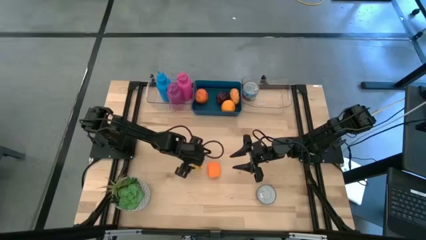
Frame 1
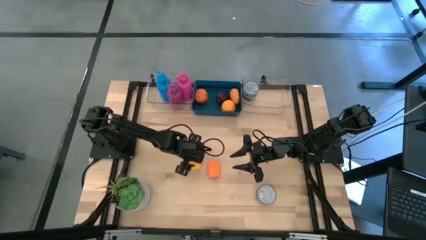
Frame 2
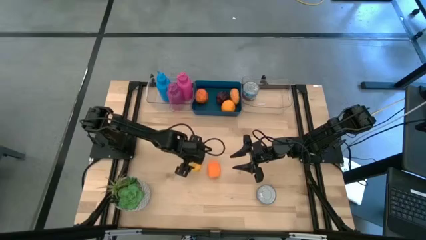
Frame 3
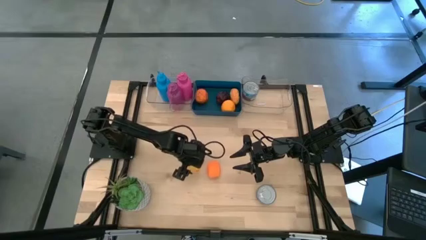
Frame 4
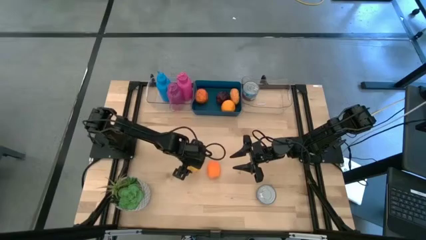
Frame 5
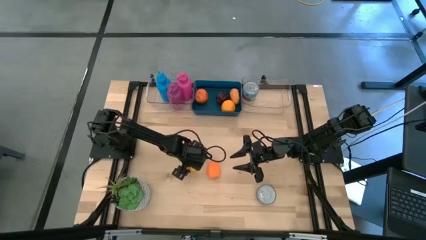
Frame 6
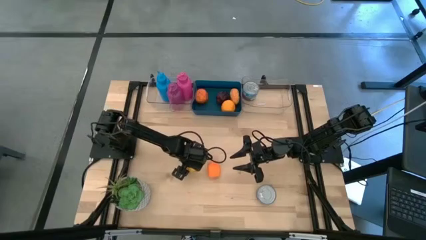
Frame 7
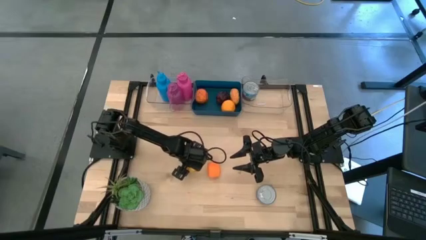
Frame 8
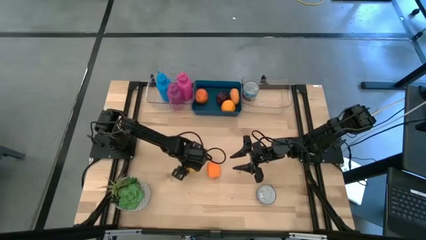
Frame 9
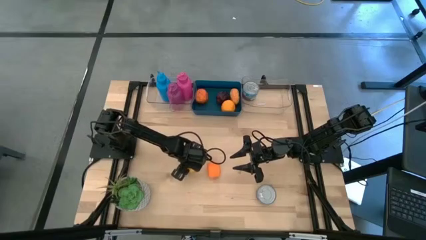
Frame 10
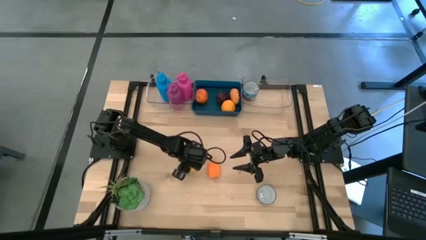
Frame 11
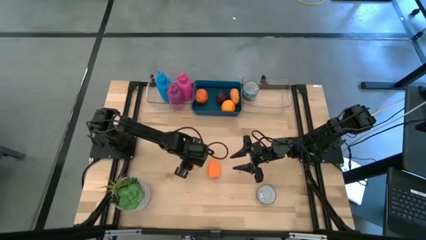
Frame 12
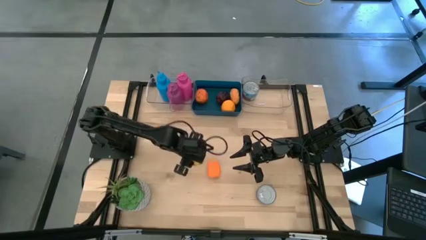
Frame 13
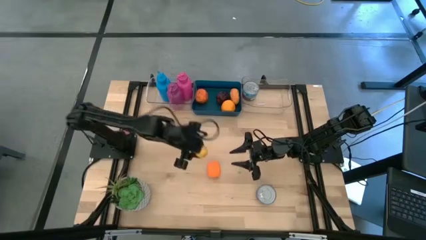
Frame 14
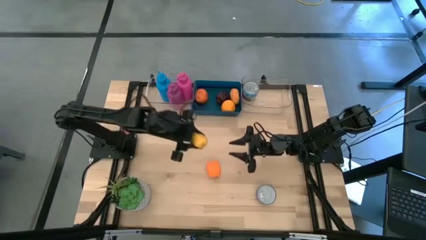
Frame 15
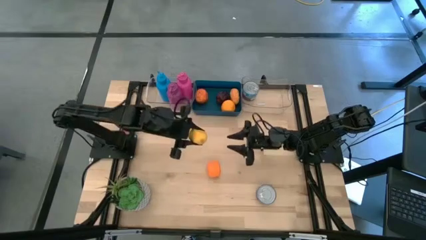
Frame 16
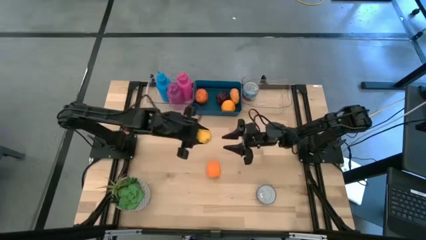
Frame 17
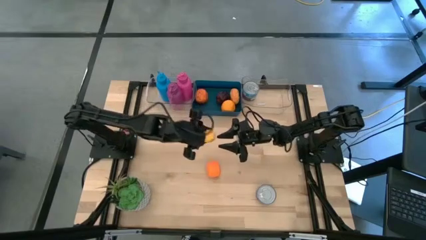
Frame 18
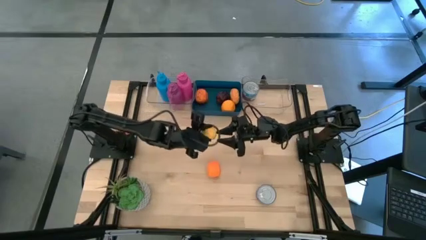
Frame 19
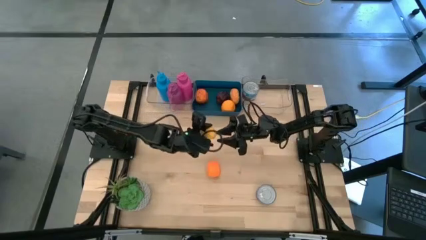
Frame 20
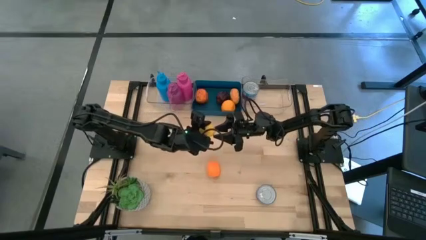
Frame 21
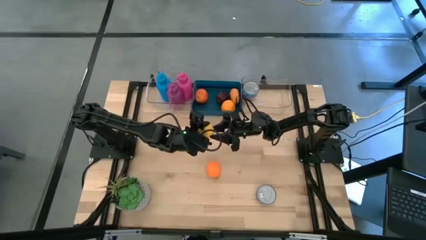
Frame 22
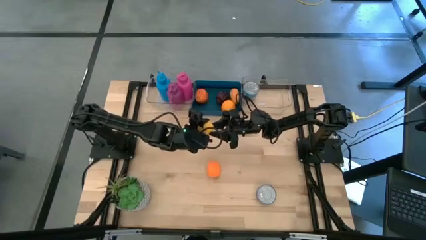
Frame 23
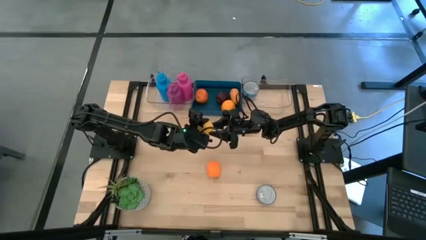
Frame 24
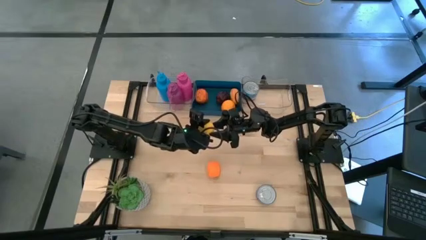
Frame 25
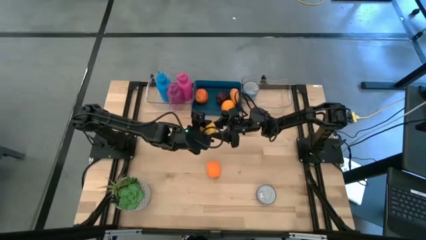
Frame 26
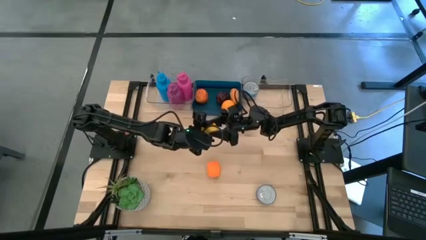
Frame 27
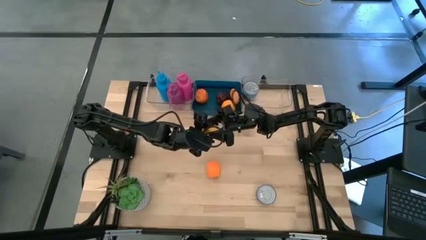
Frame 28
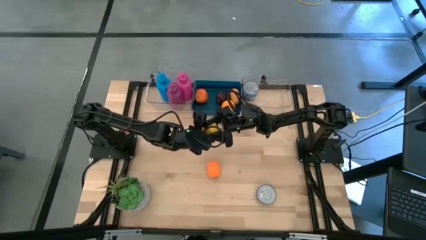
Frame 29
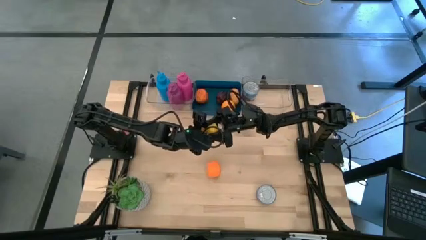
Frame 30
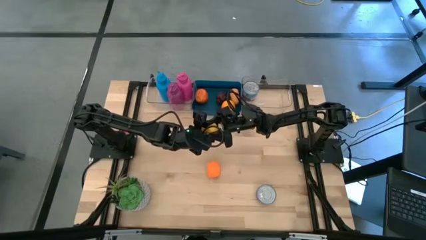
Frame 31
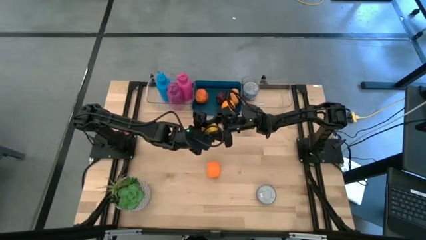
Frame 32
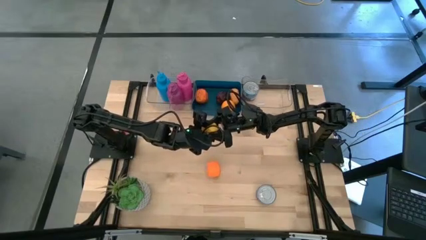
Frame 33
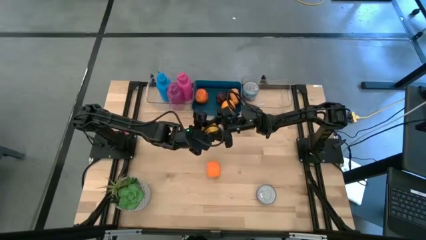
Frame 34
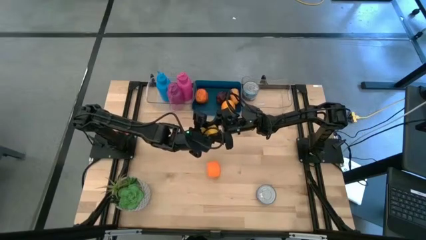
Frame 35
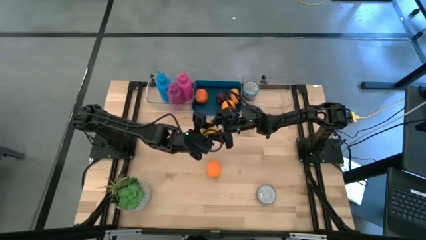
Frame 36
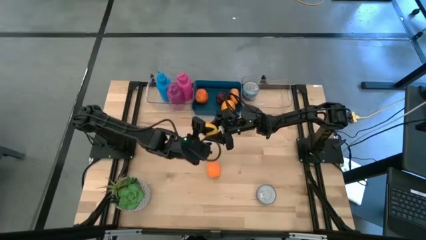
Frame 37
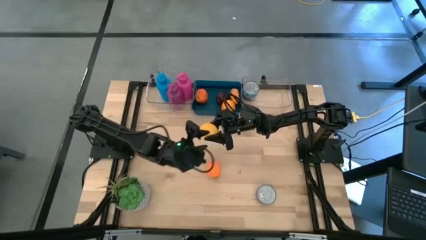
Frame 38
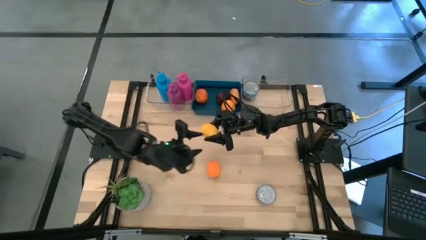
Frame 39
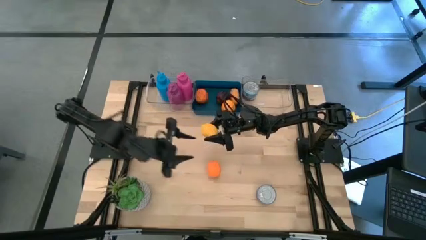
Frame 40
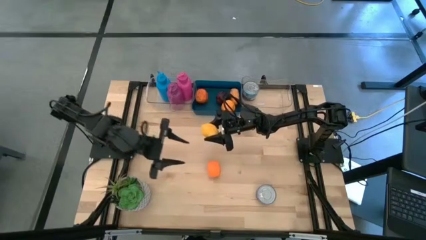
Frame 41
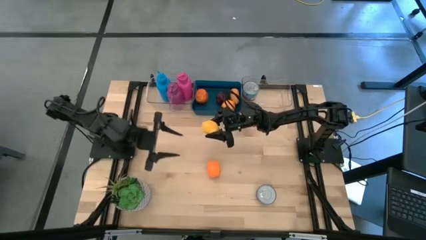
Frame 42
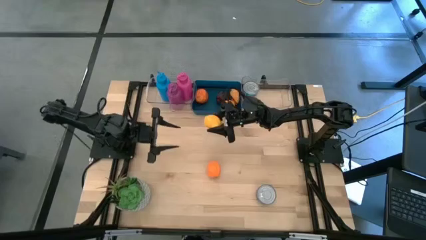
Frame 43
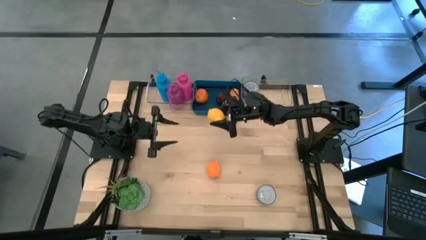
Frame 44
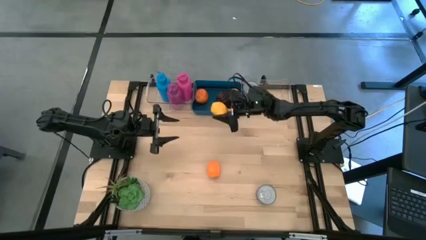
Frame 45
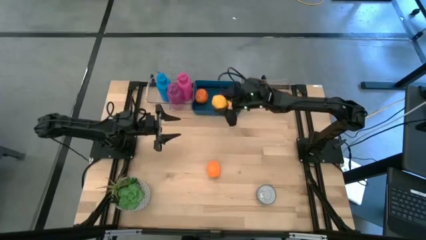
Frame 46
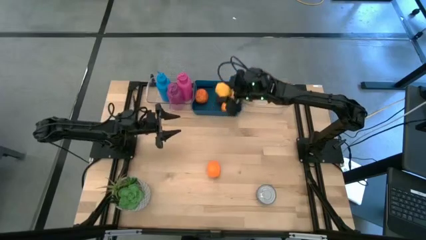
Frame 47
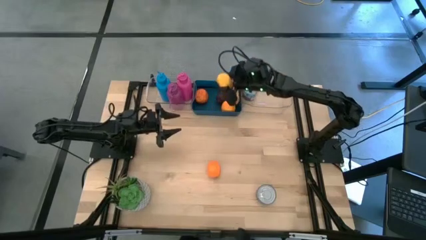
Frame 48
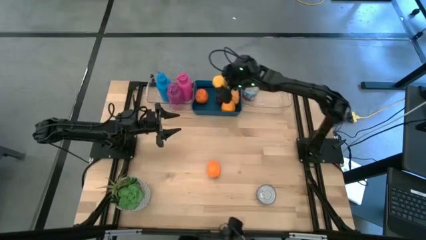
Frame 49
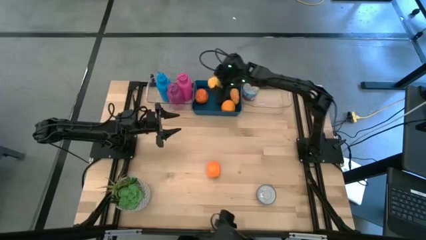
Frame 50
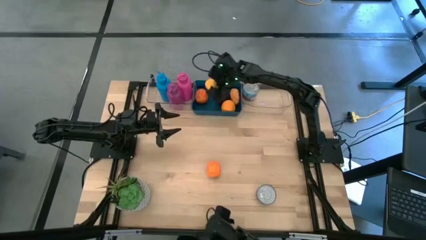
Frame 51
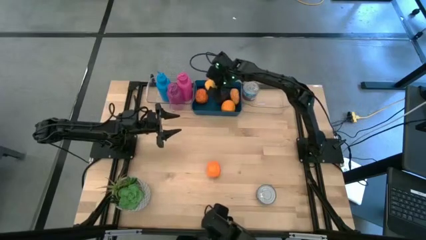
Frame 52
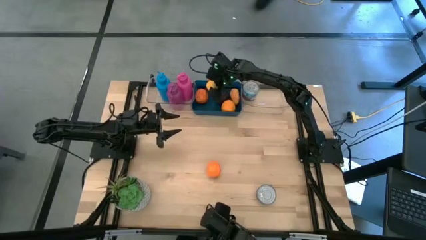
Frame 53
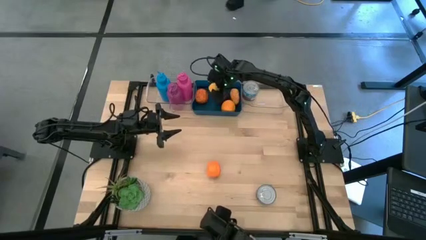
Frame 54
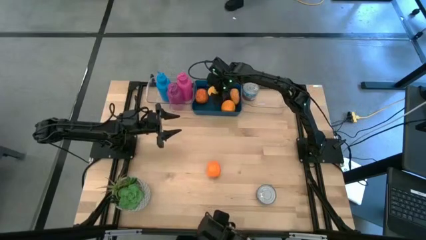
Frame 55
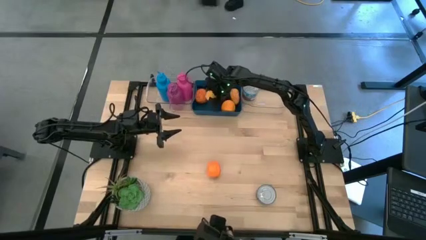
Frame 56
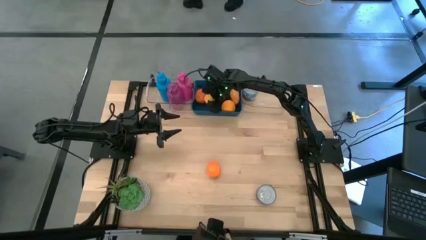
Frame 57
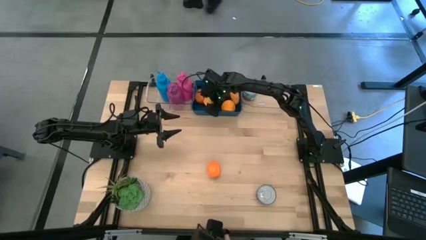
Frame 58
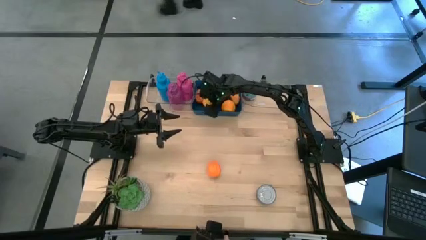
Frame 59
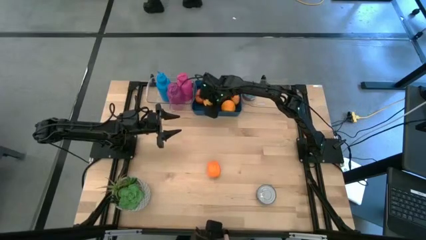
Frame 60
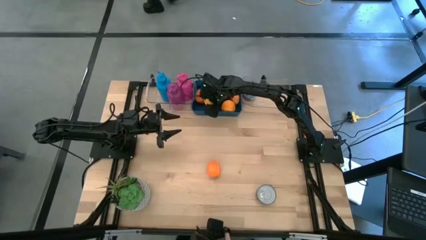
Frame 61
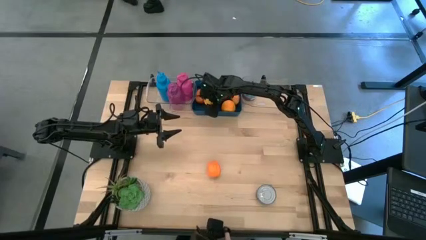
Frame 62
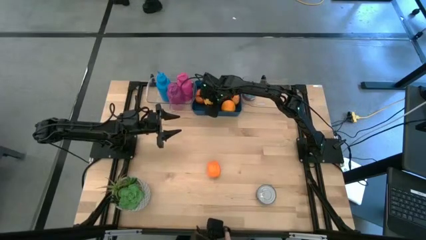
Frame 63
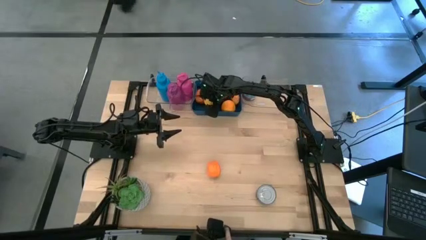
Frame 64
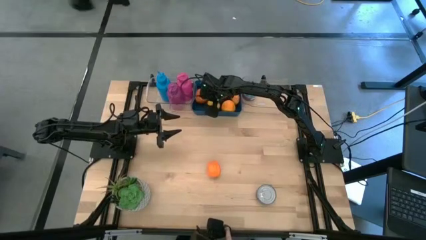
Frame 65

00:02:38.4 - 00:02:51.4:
Task: Pick & Place Food Item
Put the mango into the blue bin
